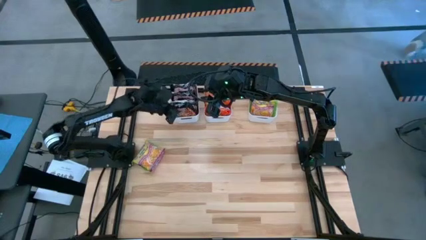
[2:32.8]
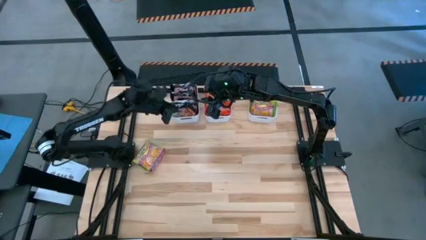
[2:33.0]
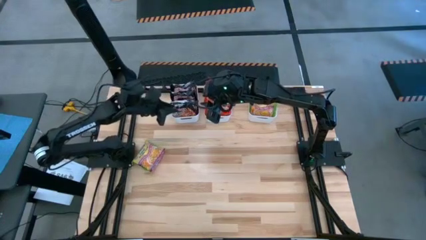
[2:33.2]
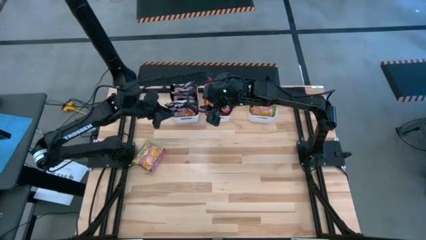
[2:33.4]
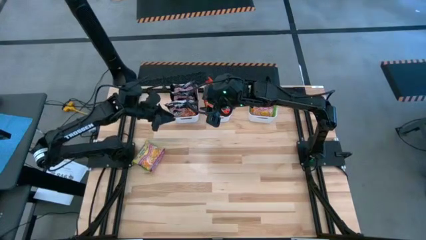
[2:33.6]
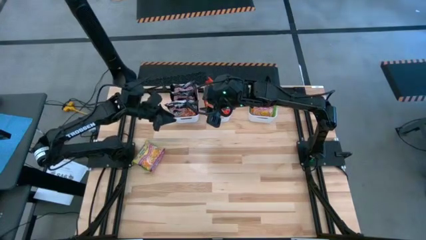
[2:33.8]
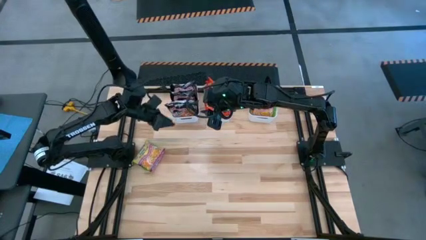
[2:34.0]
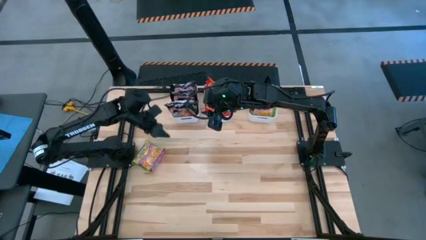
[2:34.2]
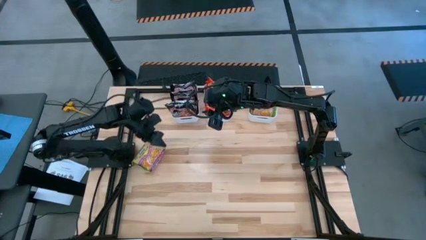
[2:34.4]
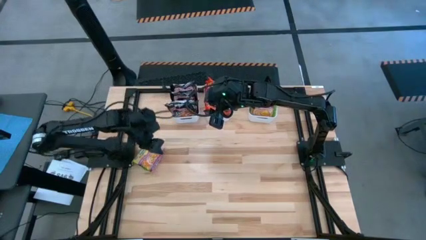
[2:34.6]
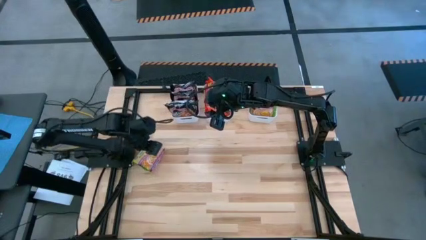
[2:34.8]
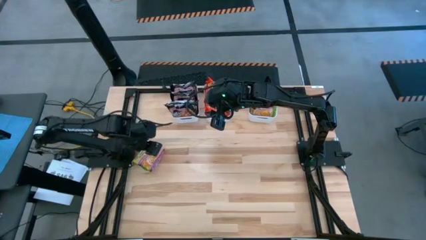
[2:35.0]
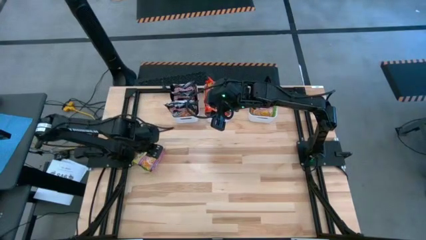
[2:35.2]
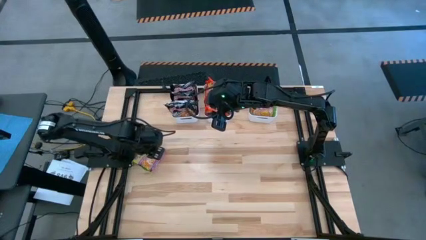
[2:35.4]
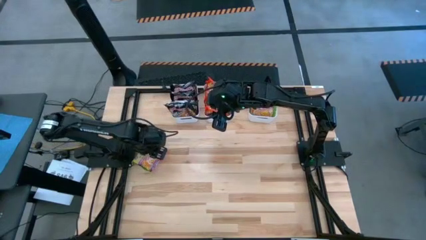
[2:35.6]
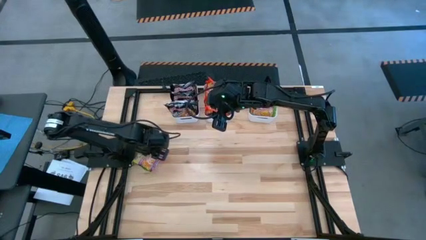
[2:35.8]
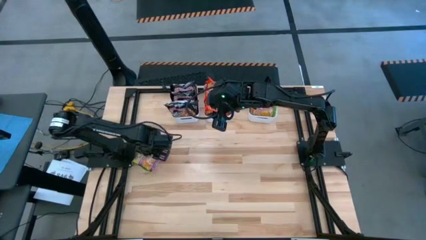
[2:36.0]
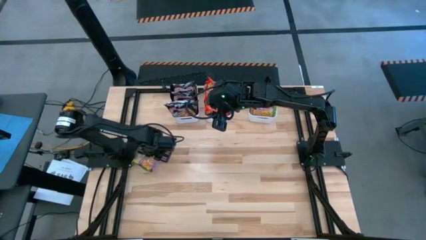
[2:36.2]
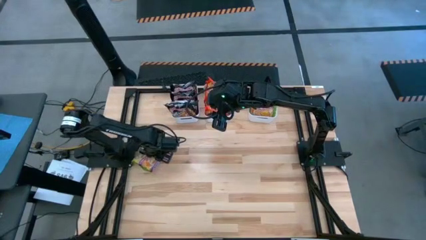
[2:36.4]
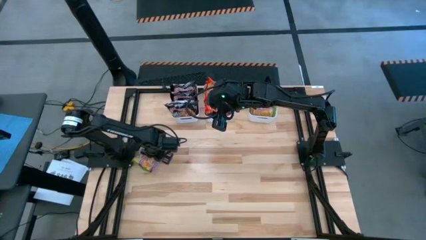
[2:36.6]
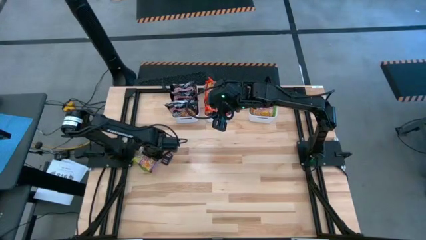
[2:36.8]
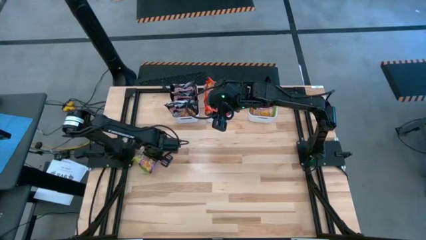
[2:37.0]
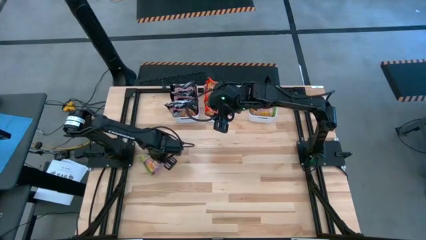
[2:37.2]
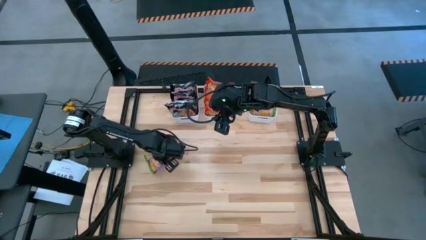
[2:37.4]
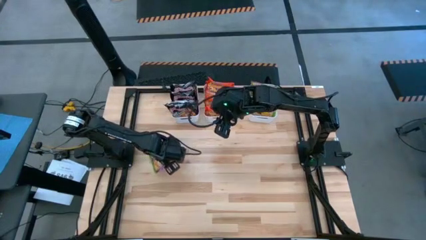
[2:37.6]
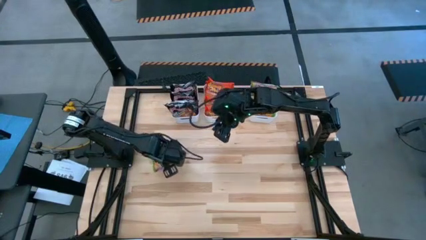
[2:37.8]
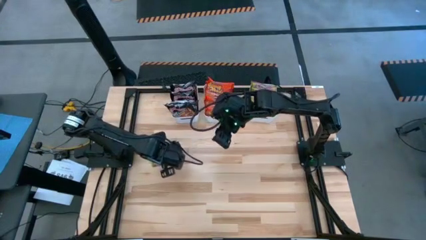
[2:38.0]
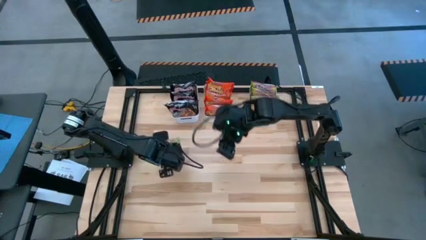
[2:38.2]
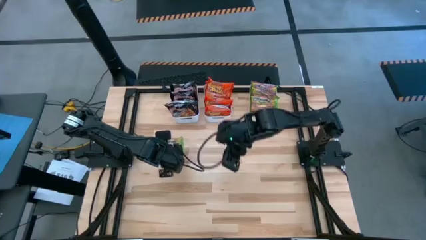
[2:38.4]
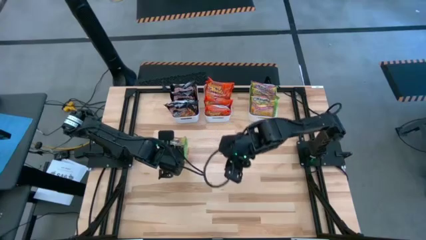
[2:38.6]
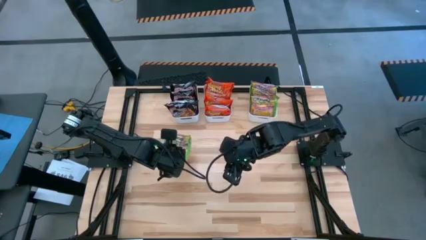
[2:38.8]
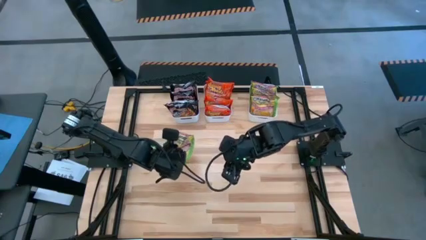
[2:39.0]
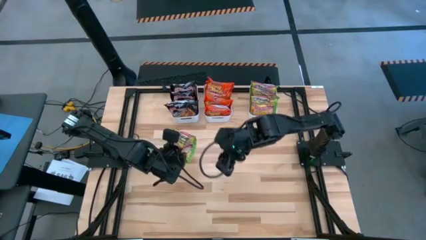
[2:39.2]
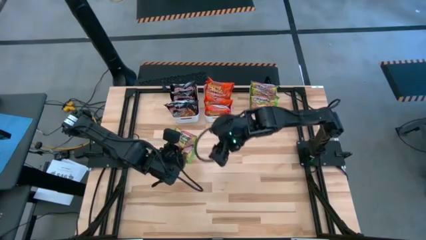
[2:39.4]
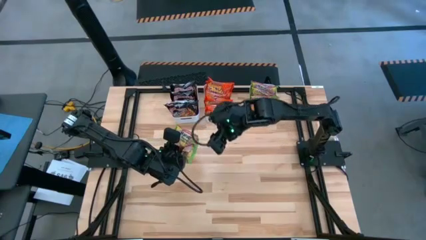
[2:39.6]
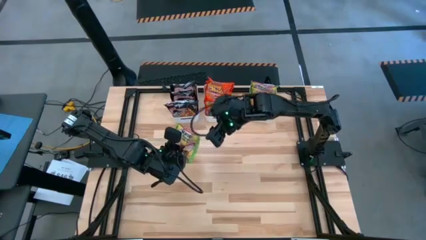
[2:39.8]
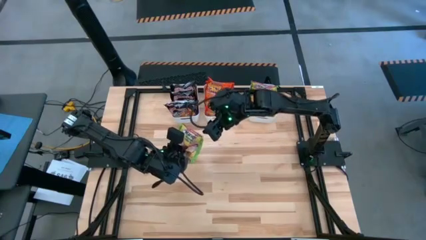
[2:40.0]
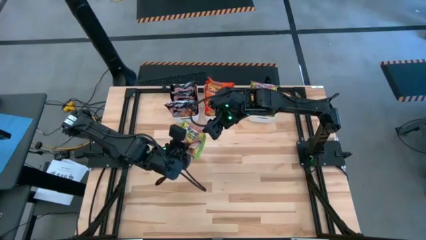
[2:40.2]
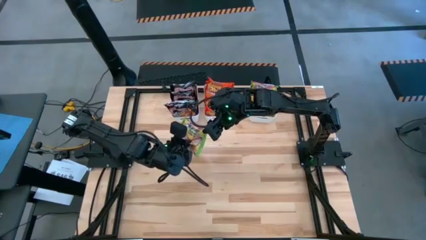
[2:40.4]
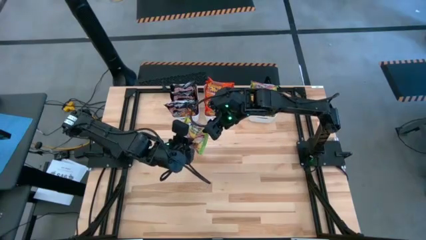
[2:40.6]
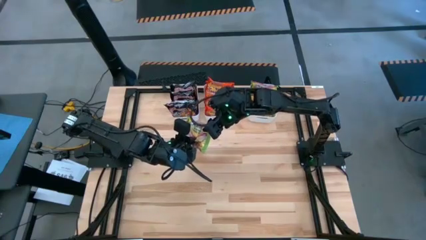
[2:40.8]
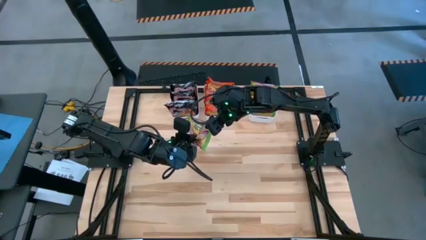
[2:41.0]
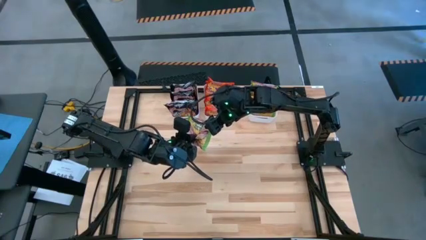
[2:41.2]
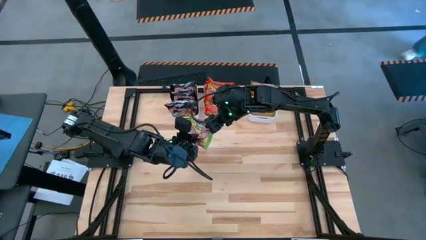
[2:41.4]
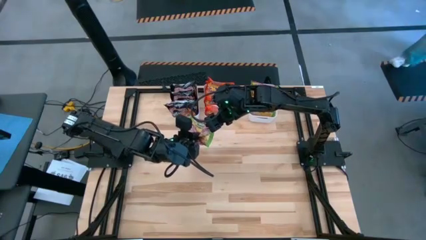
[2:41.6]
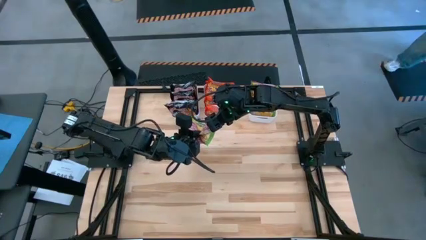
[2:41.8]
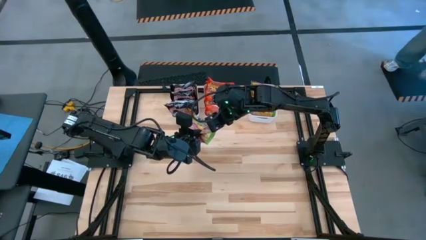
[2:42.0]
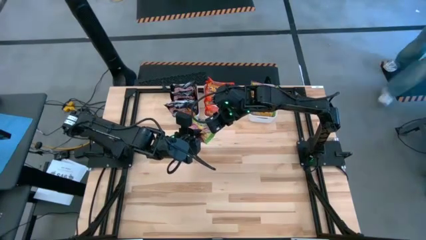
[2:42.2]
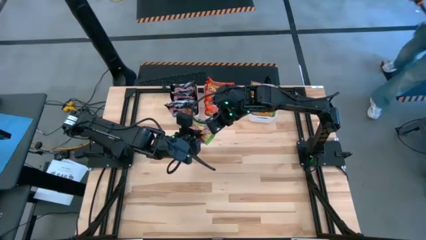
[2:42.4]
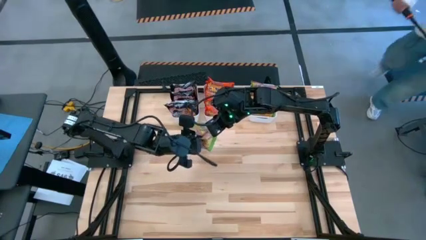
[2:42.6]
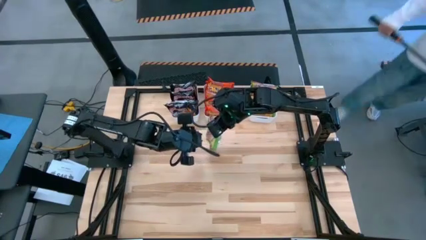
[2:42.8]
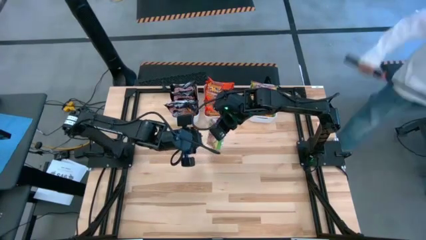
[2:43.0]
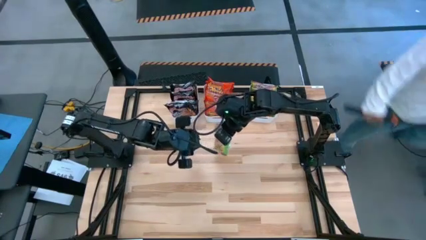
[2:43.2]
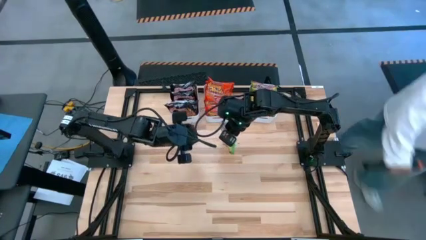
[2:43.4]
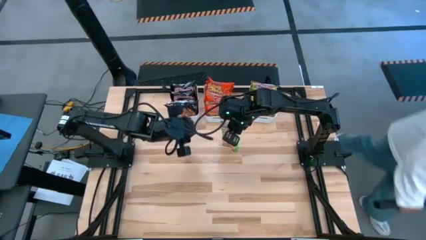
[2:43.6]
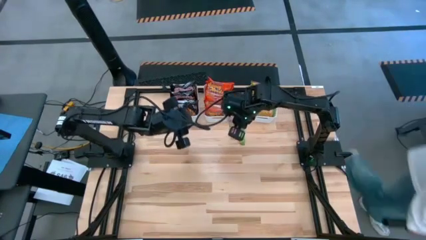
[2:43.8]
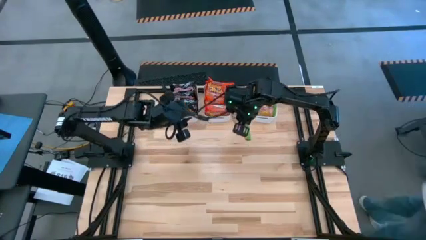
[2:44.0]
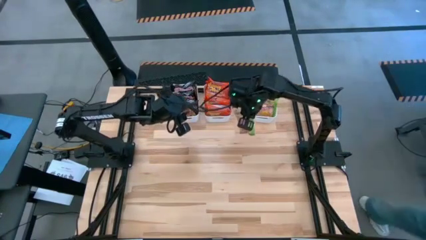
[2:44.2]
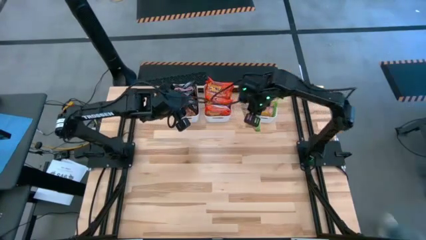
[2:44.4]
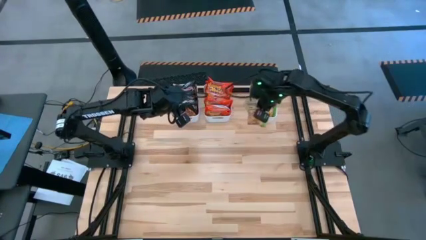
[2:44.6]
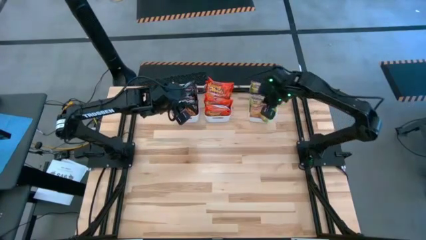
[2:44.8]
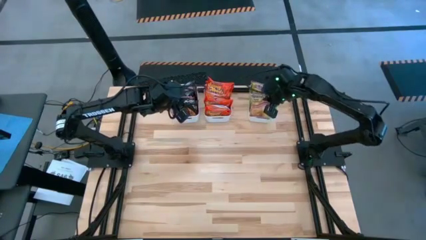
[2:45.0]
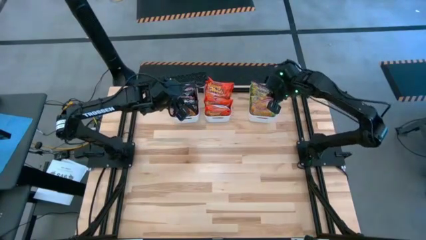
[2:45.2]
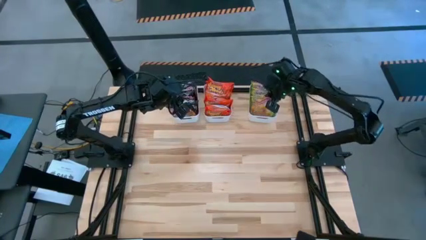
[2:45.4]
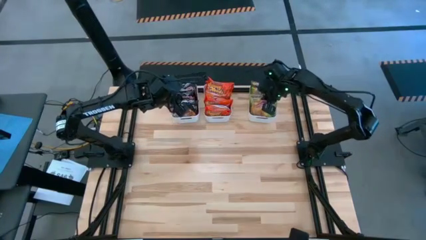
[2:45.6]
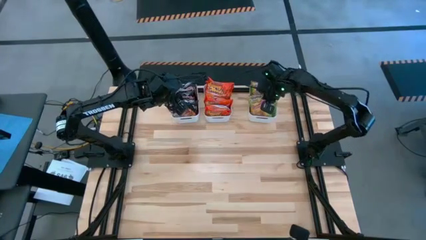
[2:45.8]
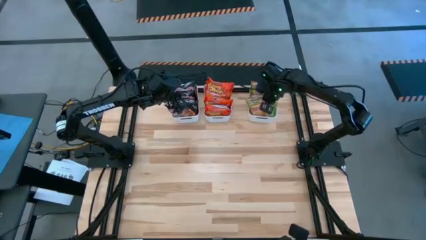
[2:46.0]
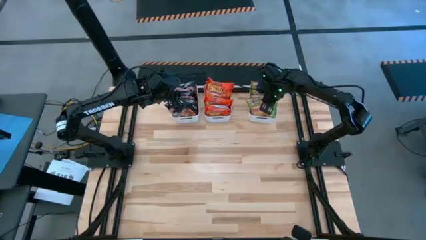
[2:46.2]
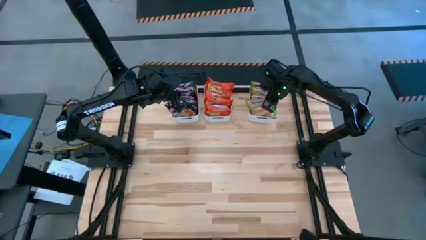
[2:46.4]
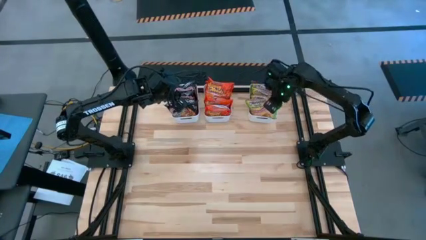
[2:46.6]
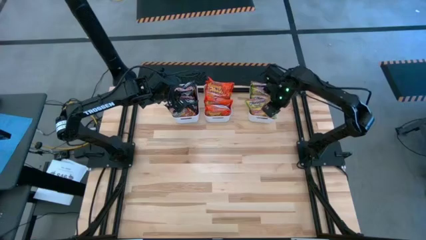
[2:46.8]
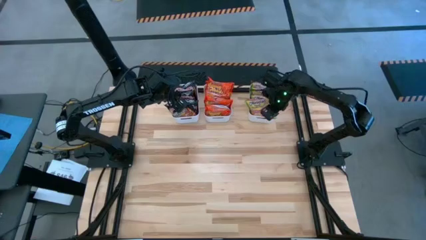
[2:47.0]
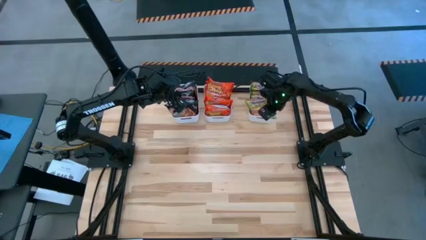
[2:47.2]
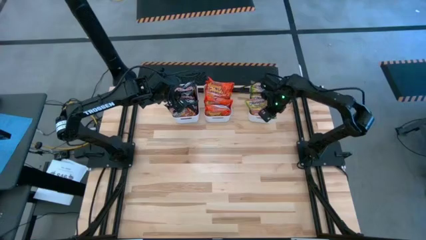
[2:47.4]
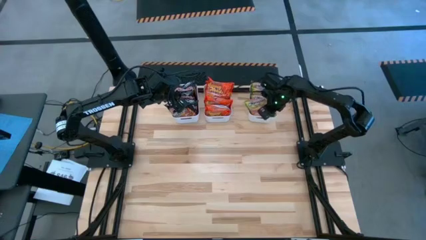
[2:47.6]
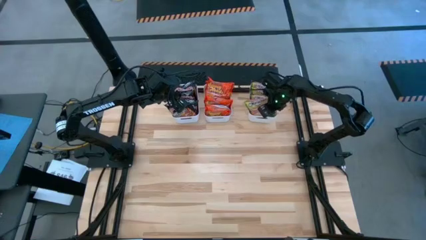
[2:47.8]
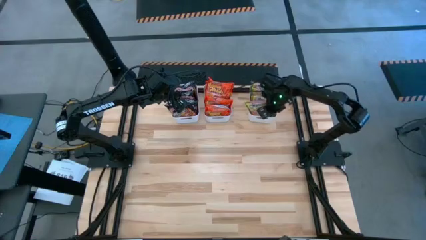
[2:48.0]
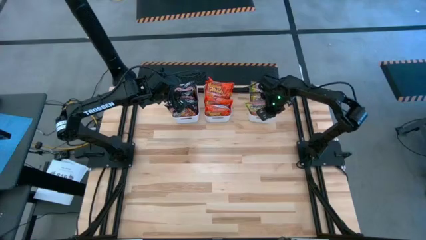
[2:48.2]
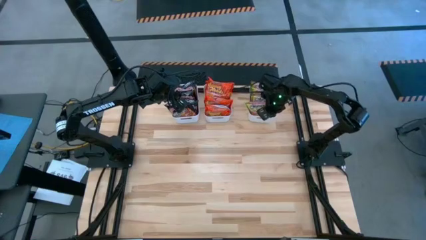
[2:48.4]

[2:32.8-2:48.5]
Task: Sort Maruchan noodles
Put the green noodle pack into the right white bin
